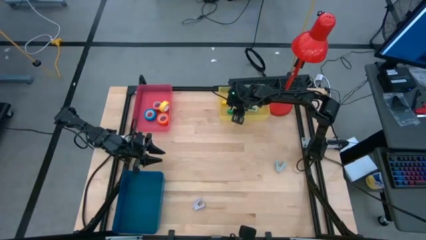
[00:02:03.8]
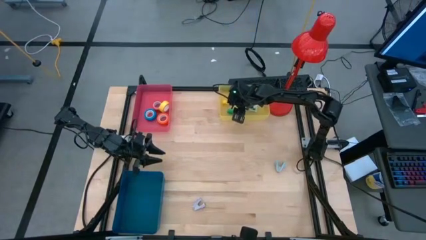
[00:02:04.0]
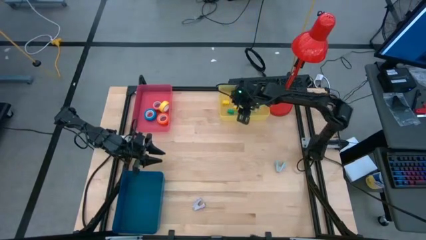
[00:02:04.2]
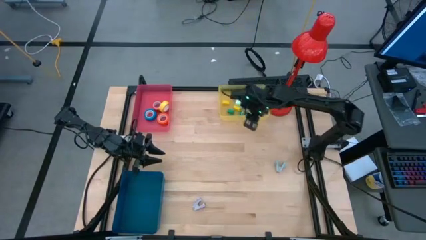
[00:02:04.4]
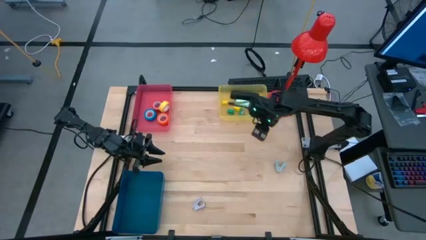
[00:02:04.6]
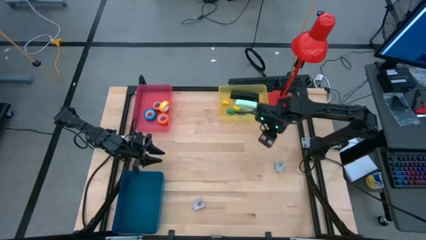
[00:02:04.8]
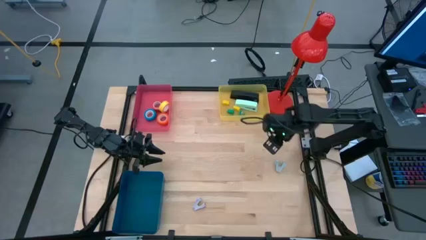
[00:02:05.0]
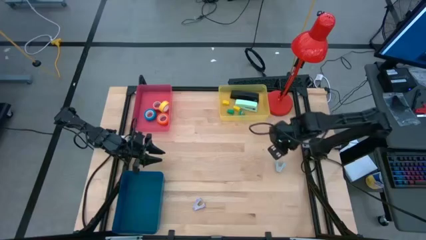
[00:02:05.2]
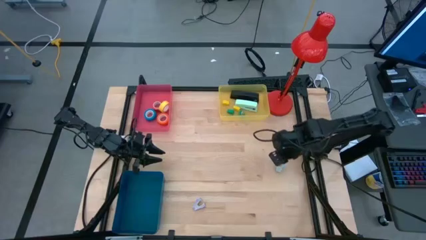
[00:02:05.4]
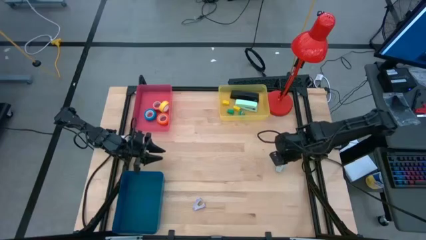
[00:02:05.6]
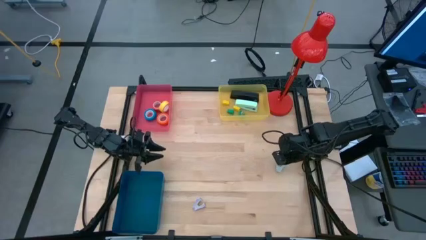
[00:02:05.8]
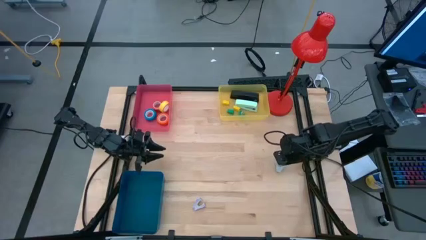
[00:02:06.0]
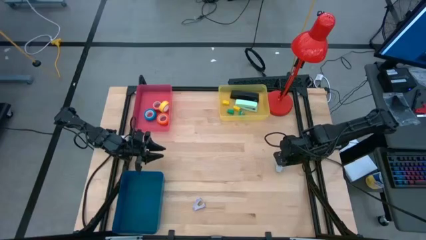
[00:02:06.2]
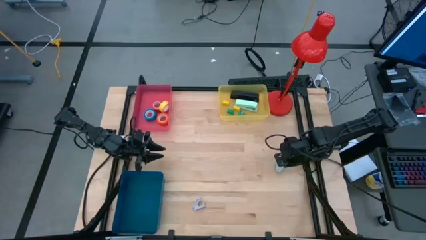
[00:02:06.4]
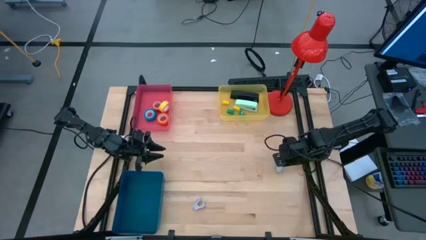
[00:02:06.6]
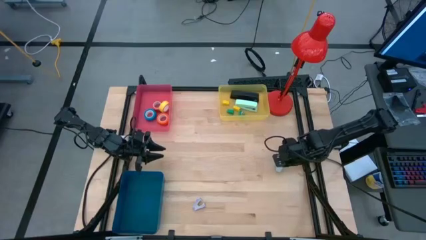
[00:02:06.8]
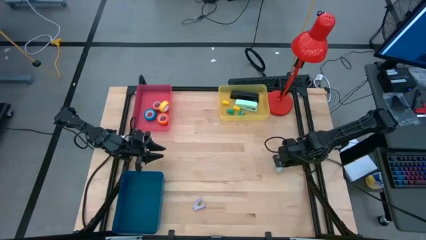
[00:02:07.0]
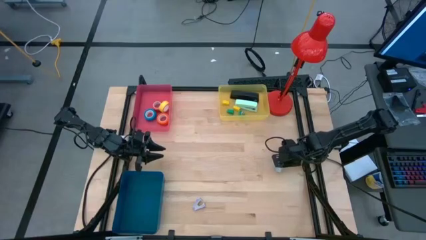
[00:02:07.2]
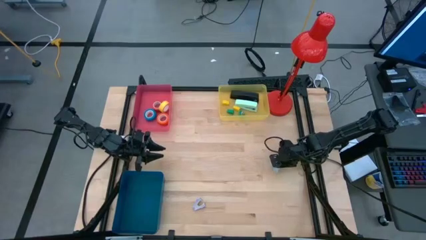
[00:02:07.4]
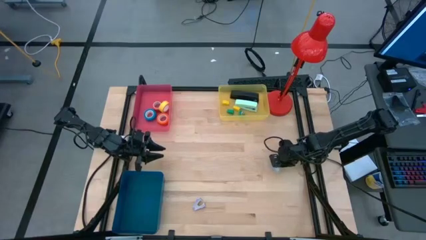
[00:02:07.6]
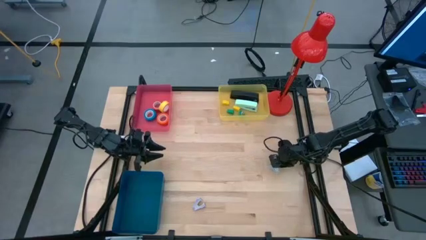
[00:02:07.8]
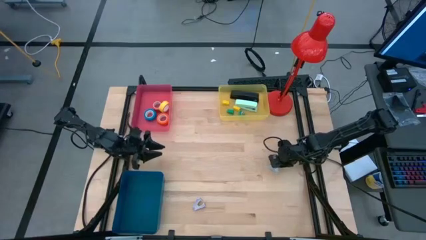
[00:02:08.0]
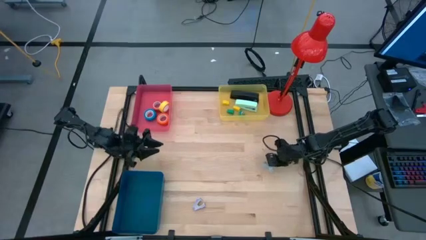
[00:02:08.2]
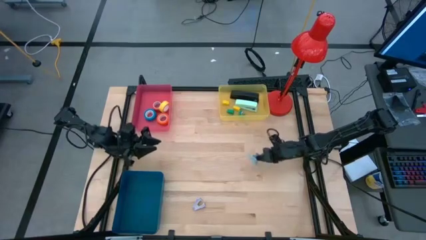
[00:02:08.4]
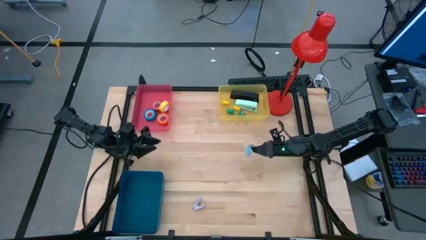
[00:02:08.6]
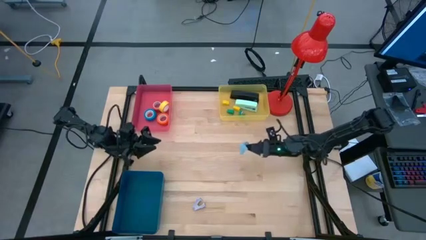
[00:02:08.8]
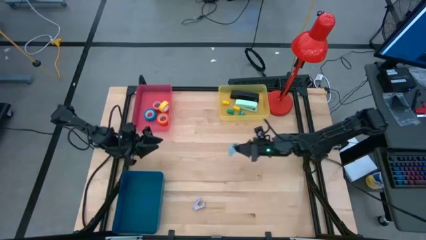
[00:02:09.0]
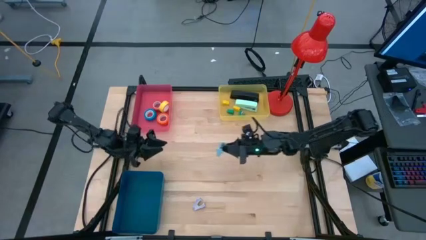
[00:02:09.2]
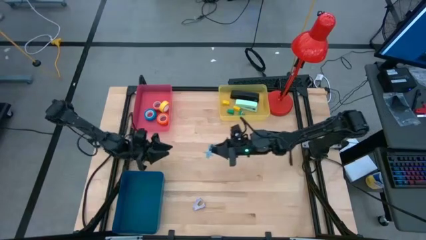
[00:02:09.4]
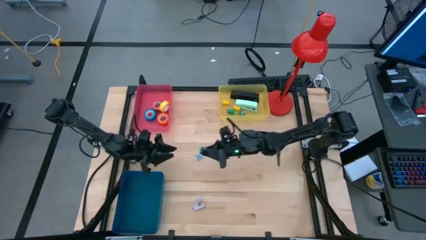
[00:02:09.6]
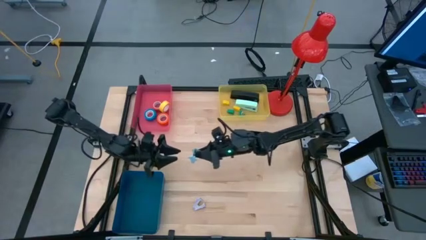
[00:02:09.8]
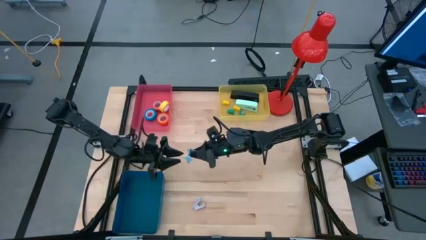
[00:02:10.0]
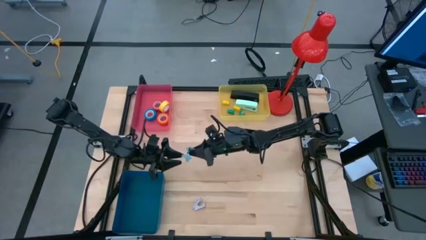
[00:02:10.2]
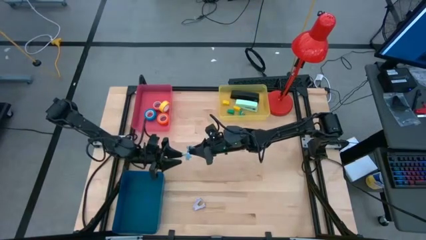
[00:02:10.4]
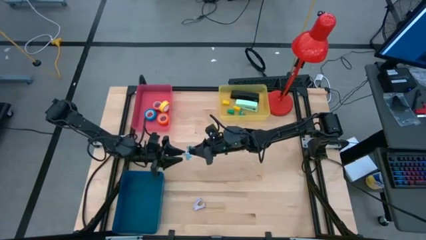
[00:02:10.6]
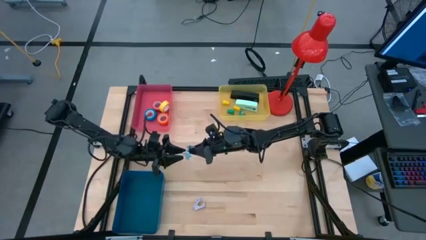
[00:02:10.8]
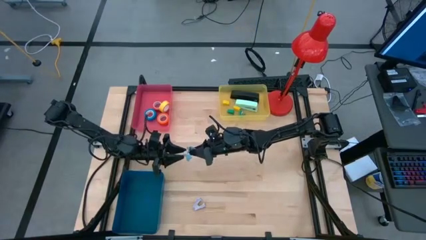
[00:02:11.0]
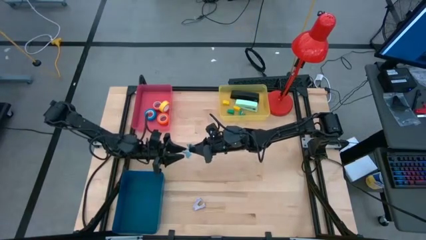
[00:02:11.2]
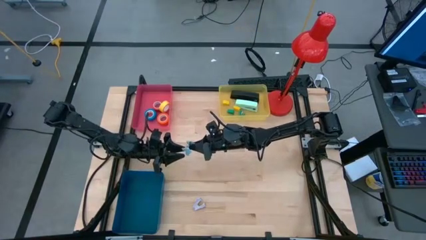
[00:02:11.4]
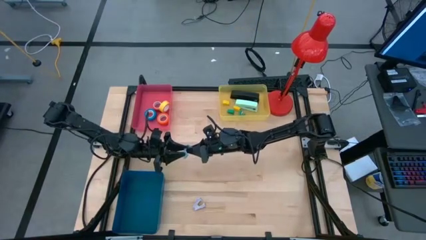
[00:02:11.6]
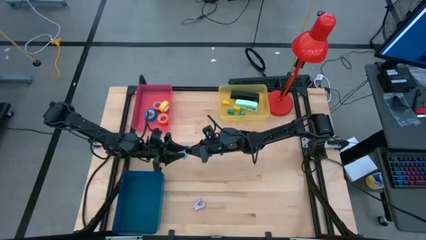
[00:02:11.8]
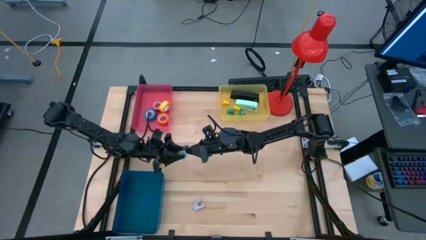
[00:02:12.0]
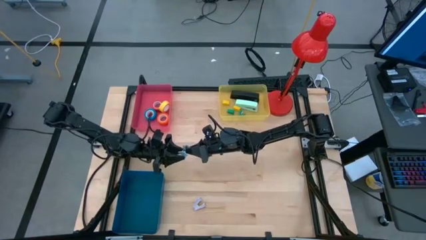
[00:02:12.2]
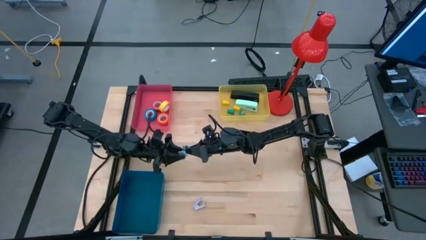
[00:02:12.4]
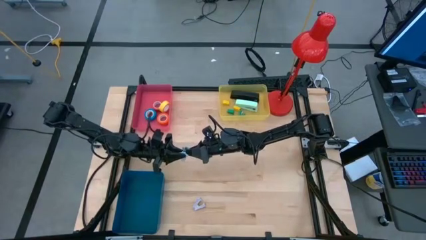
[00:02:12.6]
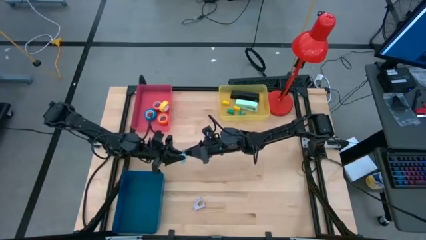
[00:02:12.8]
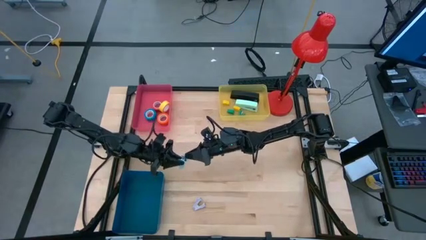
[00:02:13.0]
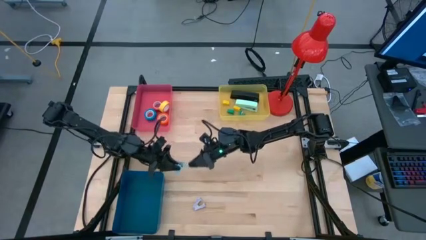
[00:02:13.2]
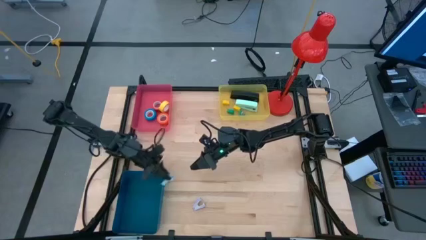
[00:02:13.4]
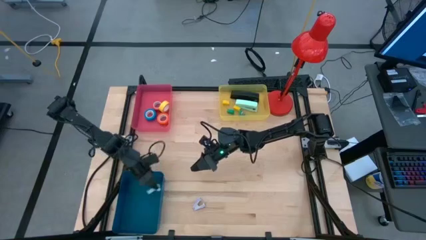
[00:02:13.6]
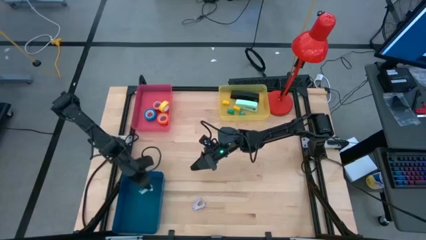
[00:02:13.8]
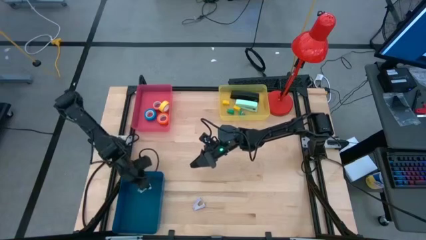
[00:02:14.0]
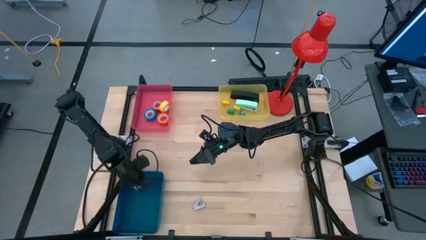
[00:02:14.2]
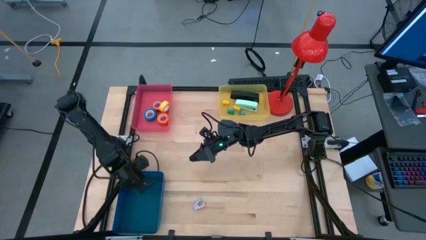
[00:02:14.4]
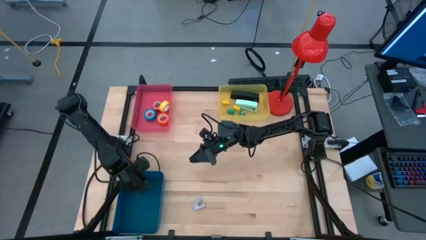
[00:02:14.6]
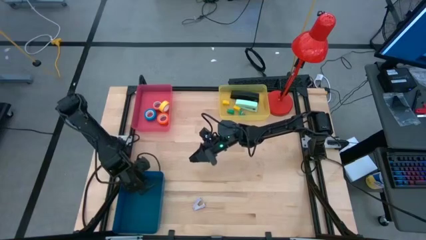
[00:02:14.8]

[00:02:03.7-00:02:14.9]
Task: Pick and place Stapler, Stapler remover, tape
Put the blue staple remover into the blue bin

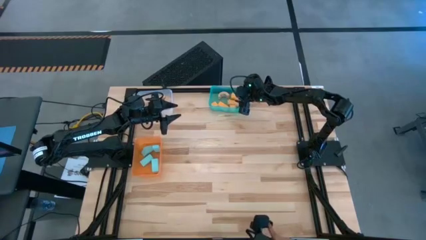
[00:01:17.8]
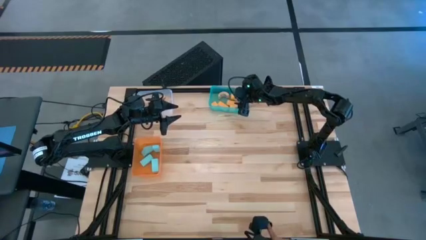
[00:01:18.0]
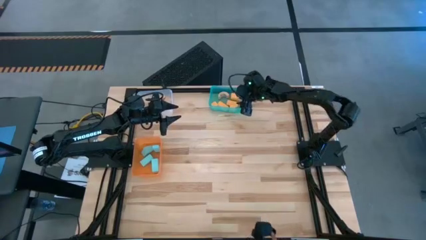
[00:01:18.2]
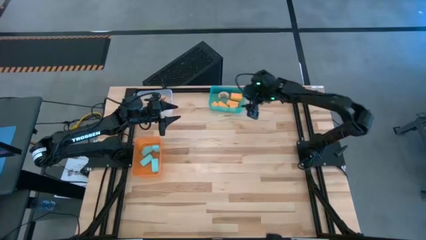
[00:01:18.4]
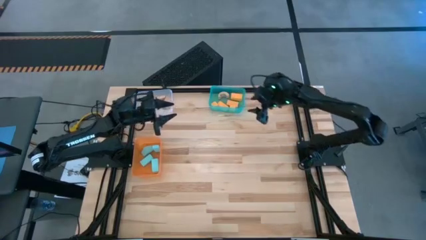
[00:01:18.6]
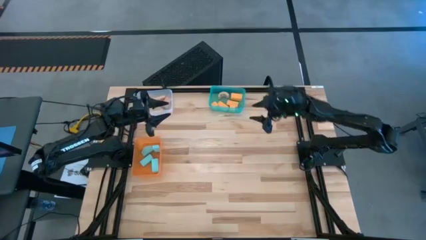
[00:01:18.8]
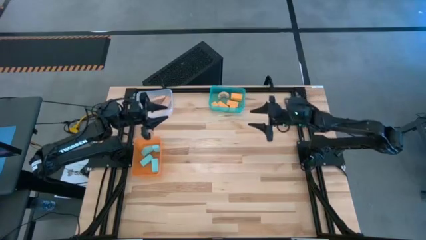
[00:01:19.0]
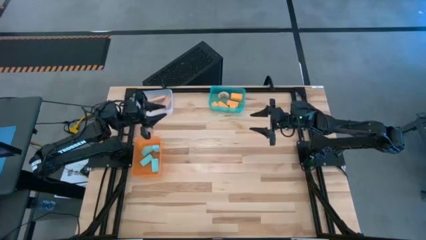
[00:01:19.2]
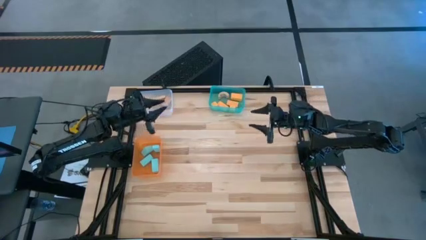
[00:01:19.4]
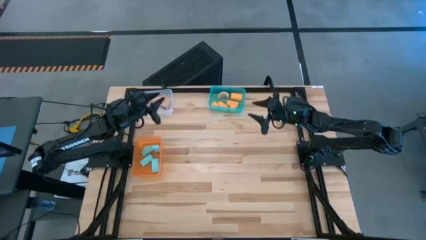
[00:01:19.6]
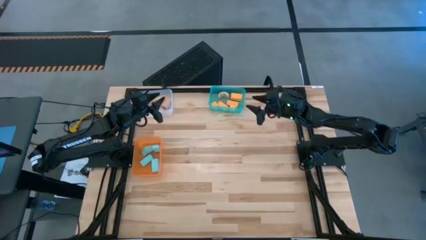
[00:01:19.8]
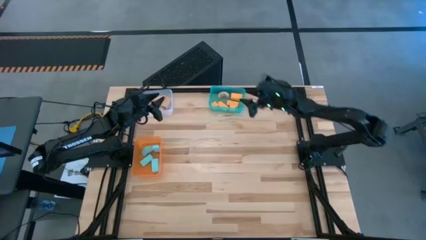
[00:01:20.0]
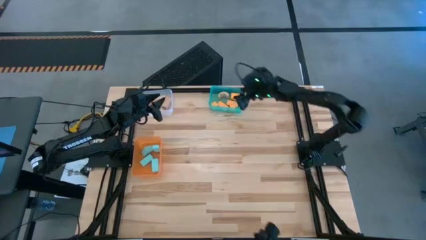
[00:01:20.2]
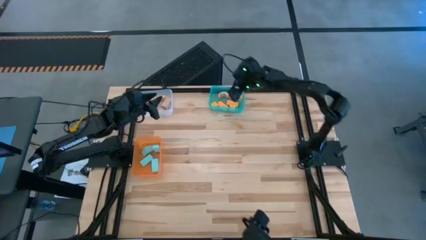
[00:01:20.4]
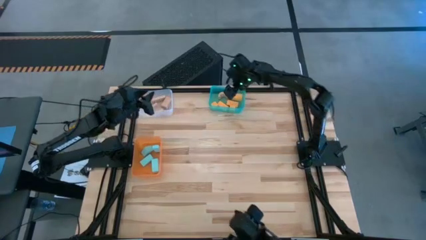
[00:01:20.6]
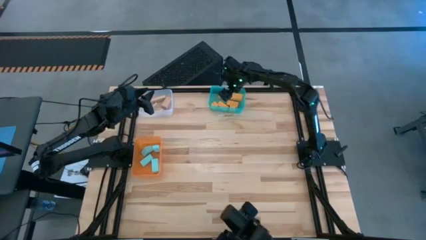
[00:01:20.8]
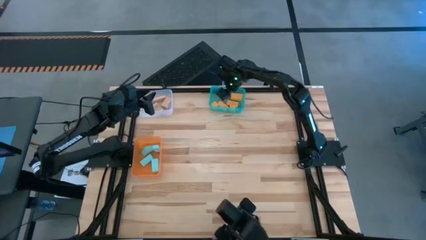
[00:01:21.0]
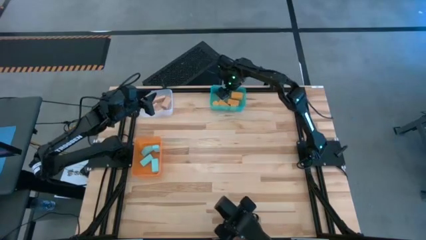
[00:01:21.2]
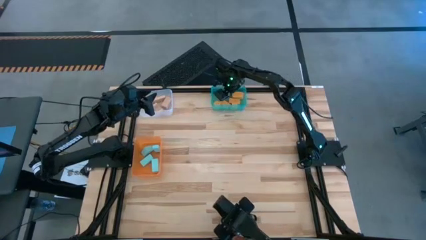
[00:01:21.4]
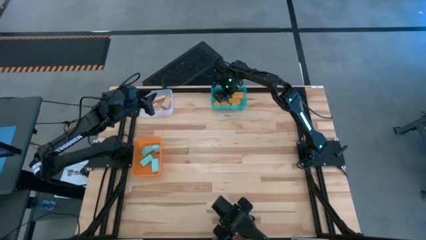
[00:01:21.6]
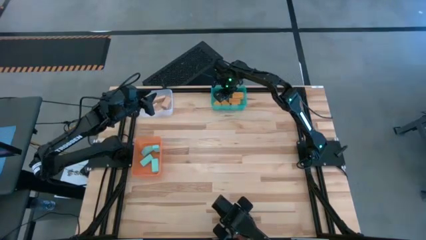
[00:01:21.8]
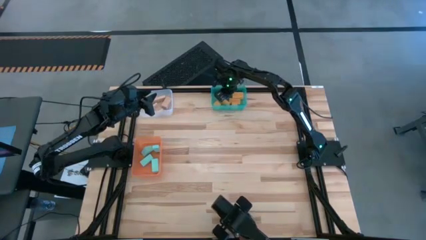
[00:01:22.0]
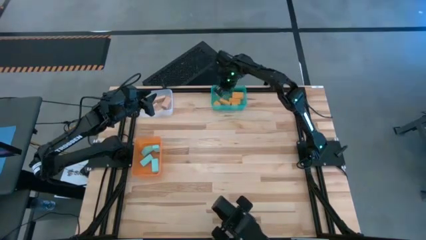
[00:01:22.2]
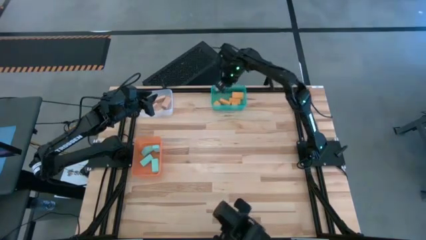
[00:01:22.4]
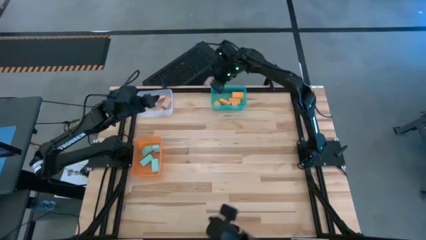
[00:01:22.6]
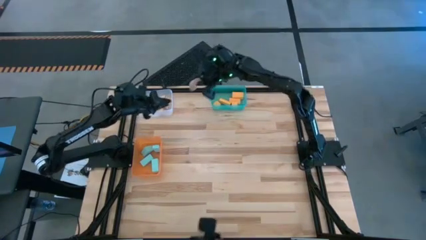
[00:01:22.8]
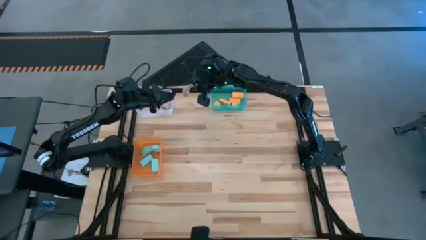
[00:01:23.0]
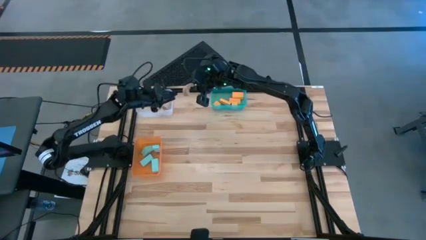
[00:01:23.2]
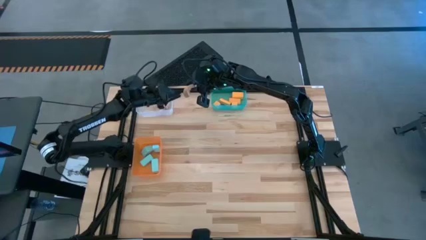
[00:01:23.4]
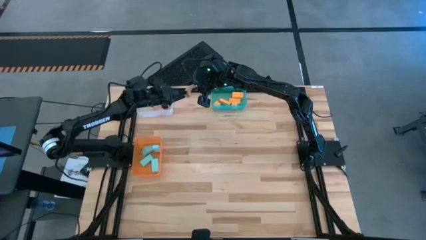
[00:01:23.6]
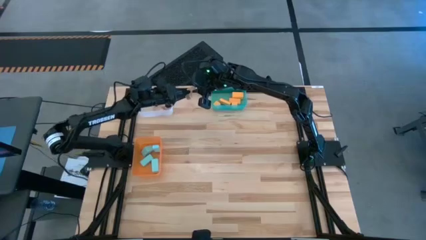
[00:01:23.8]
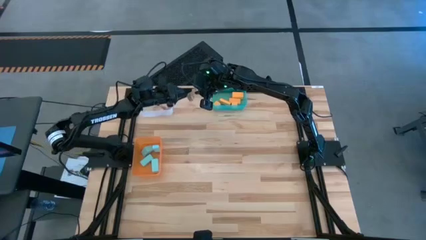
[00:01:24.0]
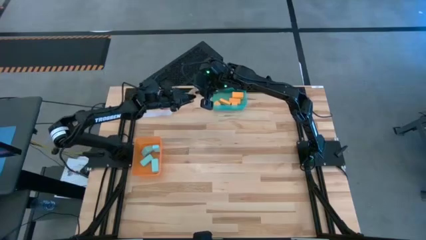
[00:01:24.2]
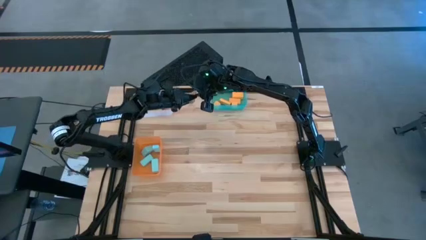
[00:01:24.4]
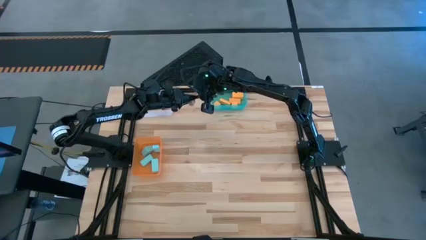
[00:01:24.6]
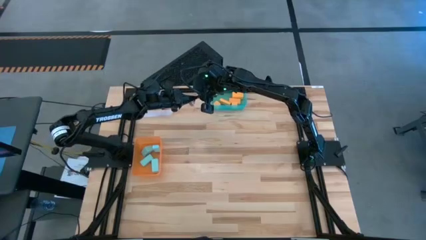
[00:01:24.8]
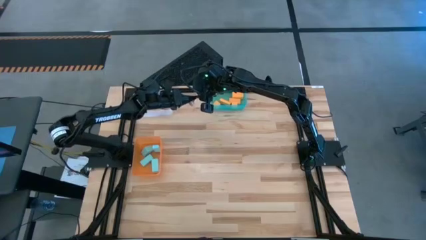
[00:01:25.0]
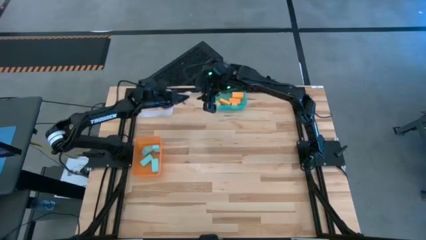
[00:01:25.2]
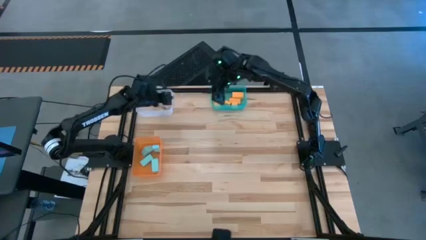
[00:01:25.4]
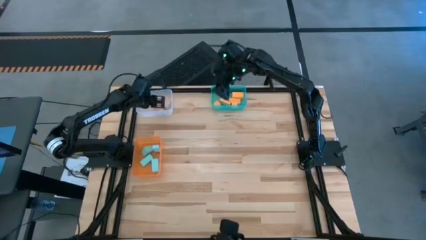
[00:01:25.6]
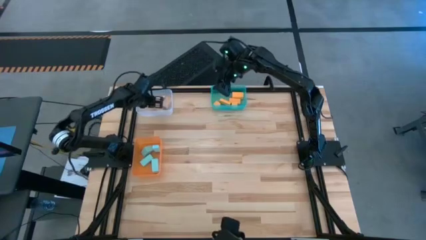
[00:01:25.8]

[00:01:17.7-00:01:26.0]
Task: Sort & place blocks by color
Put the light brown block into the transparent bin
